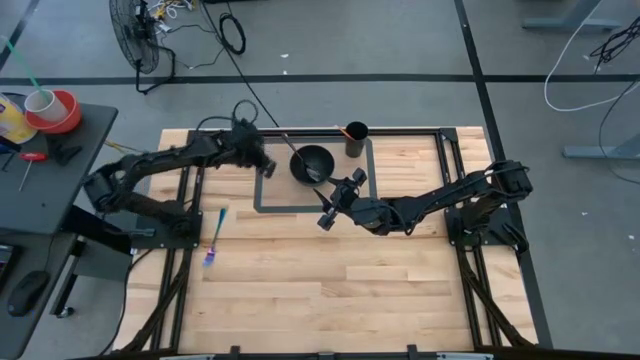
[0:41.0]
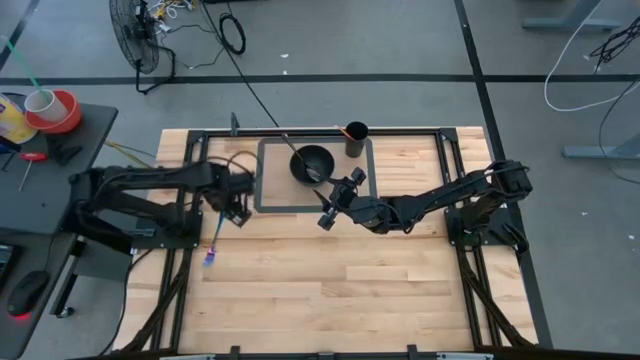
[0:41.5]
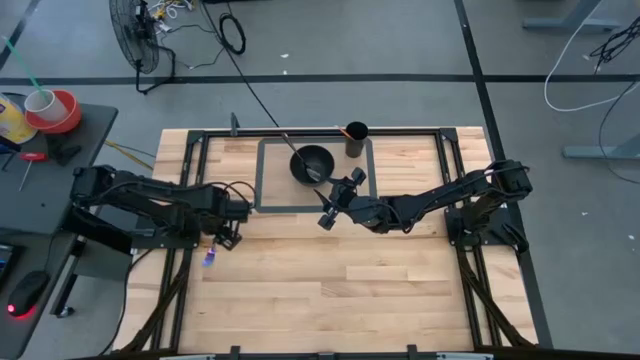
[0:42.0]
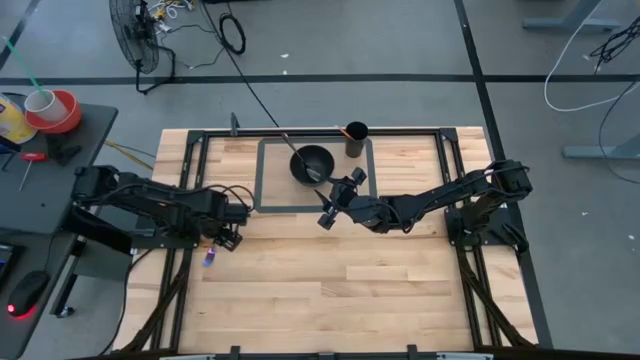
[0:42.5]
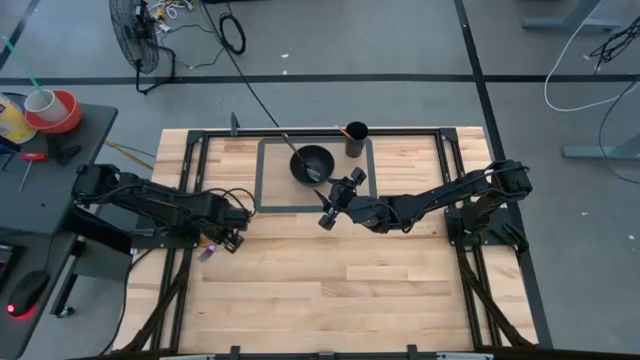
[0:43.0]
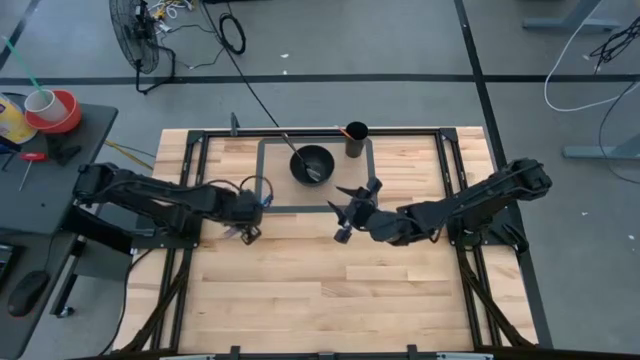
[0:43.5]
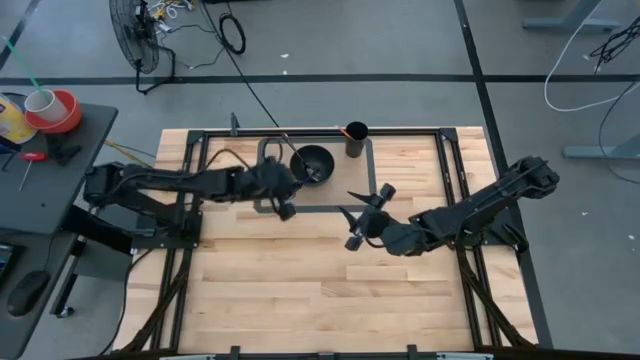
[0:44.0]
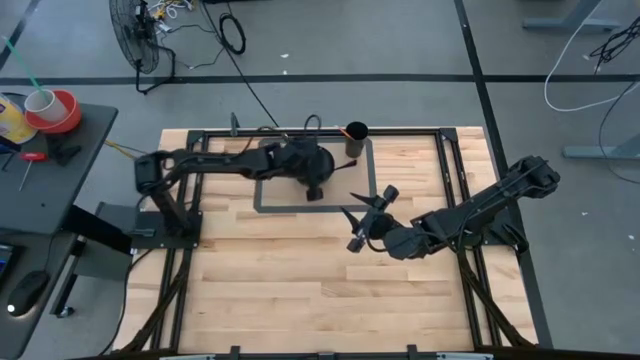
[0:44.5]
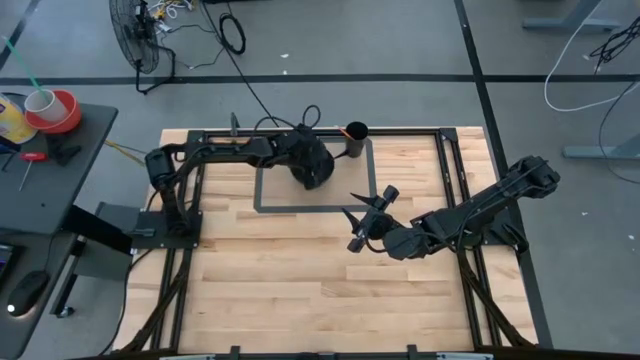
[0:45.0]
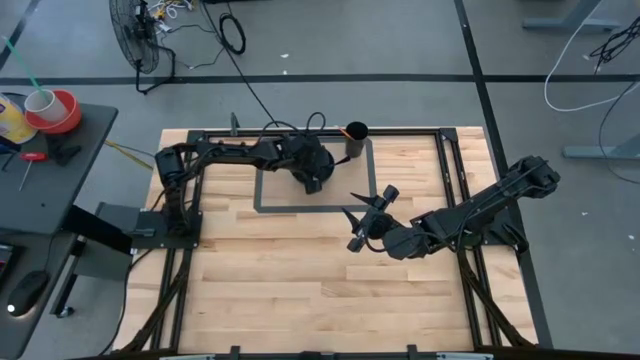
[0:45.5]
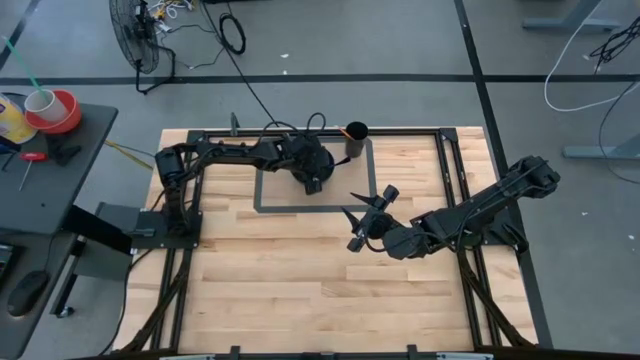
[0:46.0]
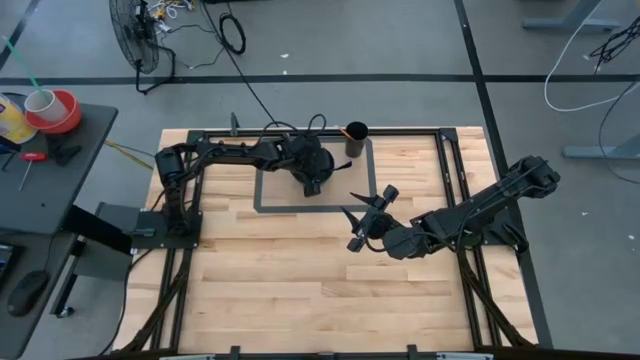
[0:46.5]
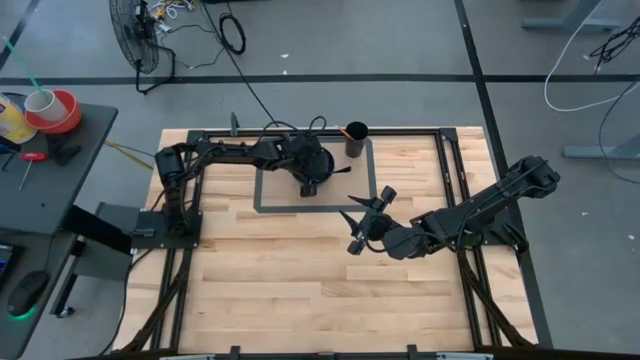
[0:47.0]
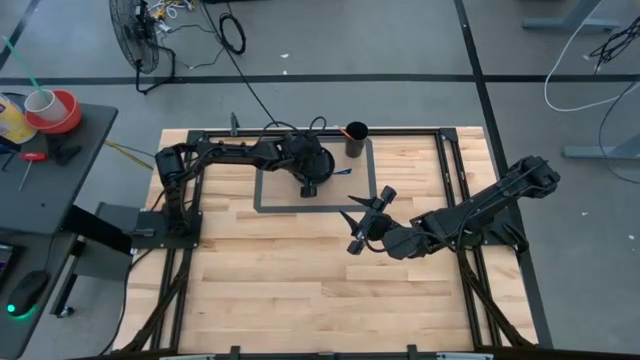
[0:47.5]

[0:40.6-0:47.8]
Task: Pick & Place Utensil
Put the blue fork into the black bowl

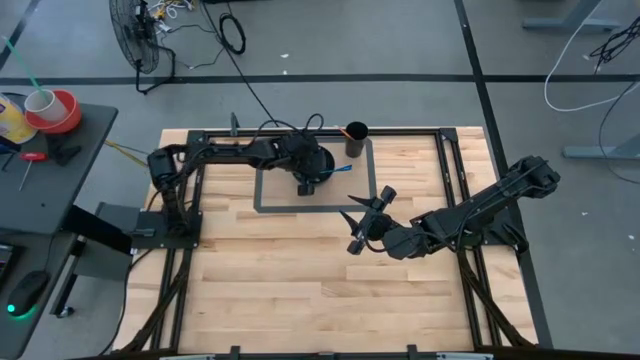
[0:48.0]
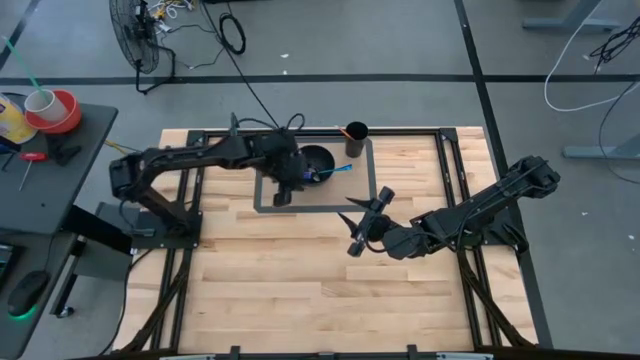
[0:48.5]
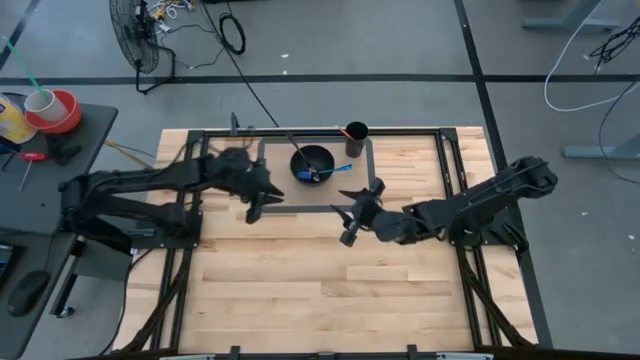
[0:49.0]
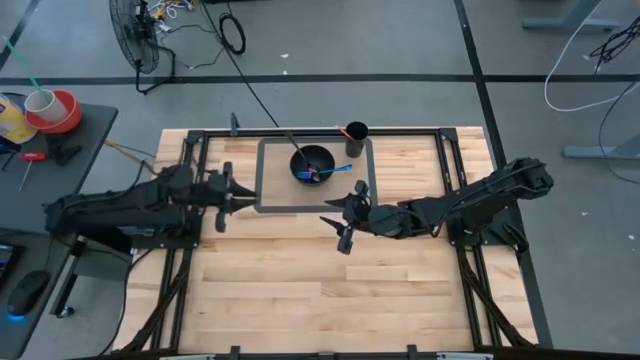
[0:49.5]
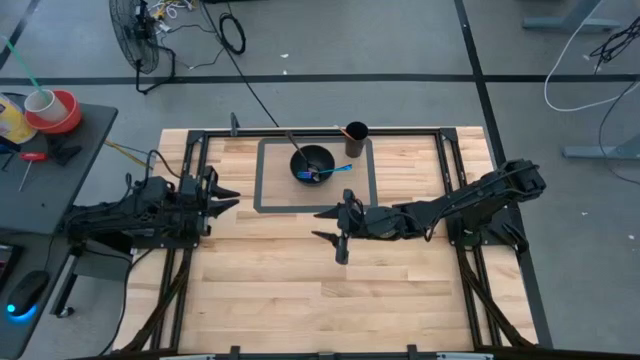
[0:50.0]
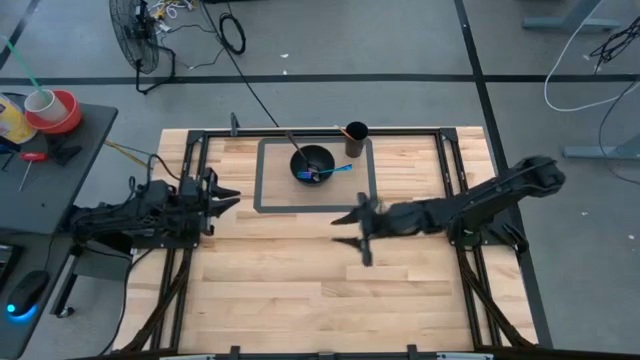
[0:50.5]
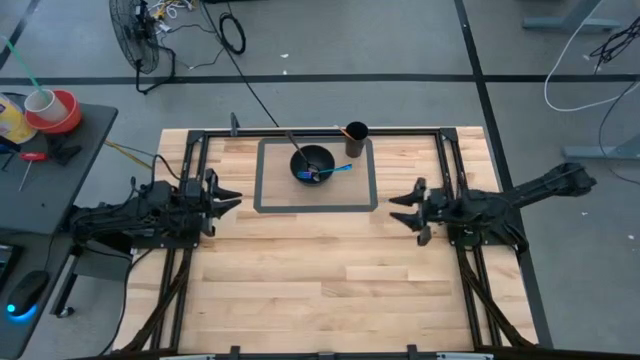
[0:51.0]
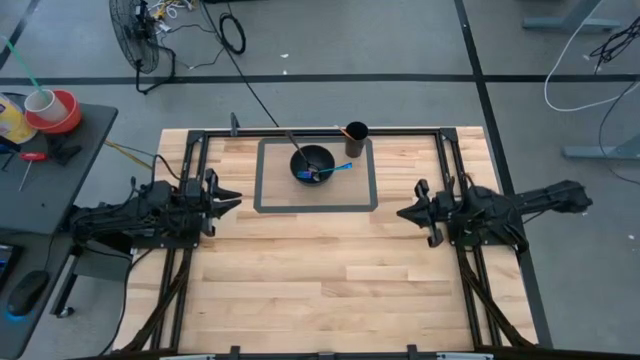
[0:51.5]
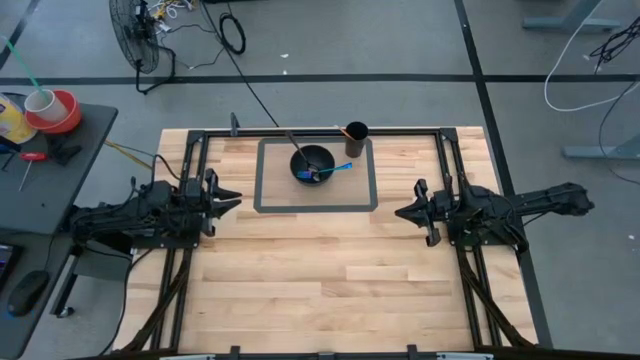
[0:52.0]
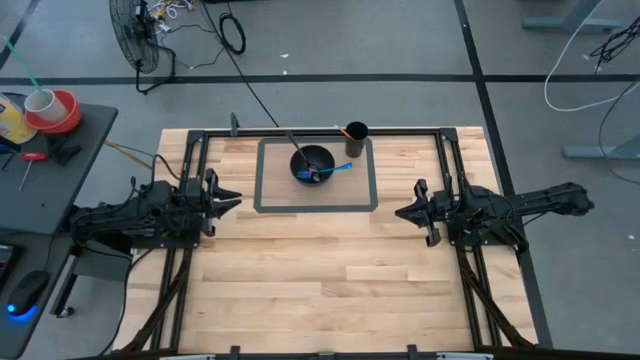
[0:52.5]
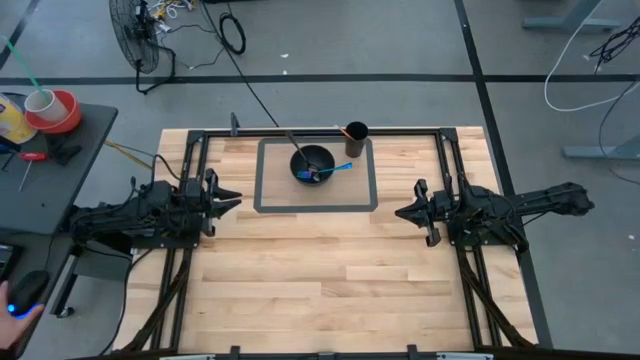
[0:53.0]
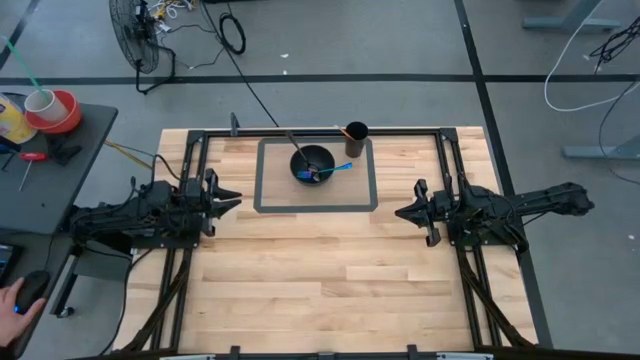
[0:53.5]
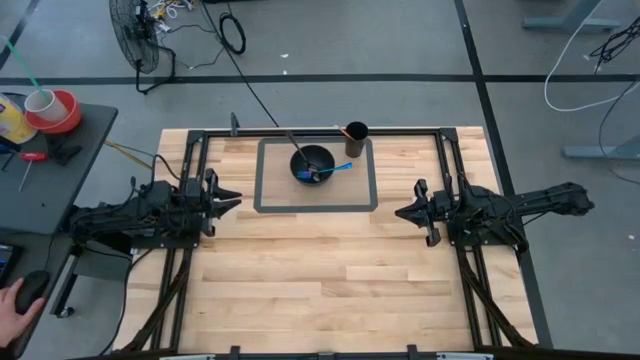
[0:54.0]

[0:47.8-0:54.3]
Return to Home Position

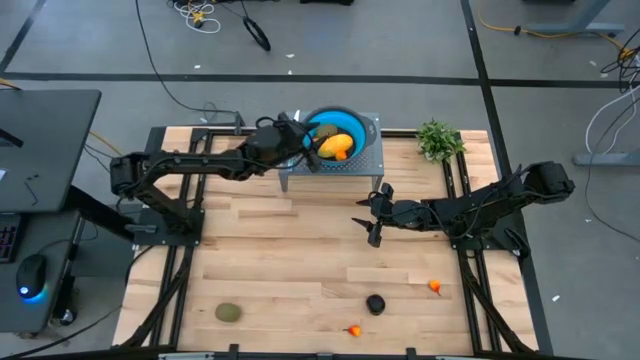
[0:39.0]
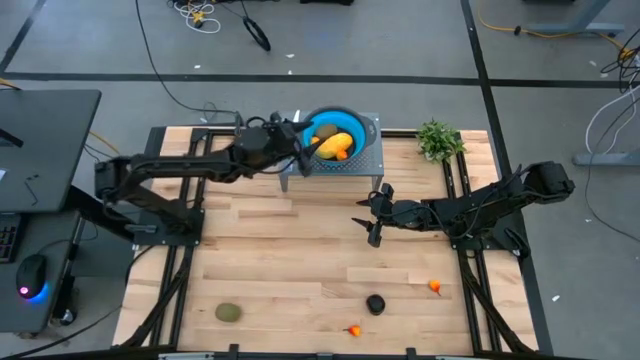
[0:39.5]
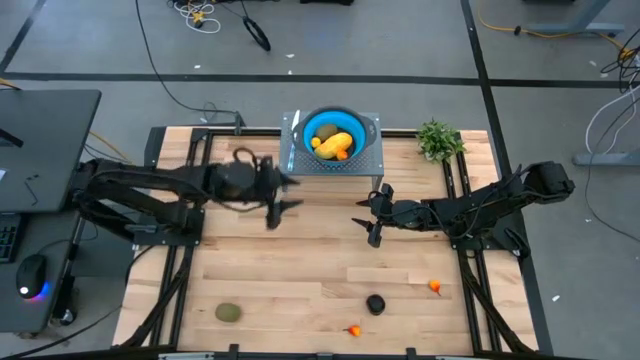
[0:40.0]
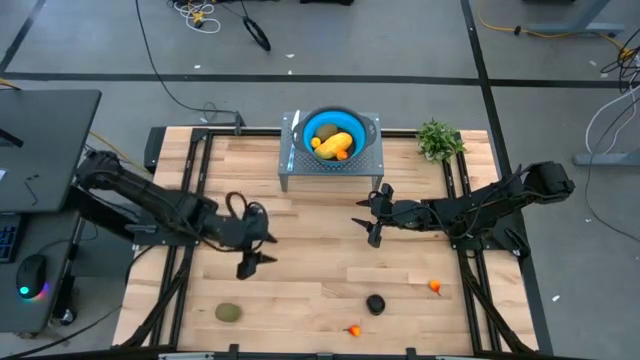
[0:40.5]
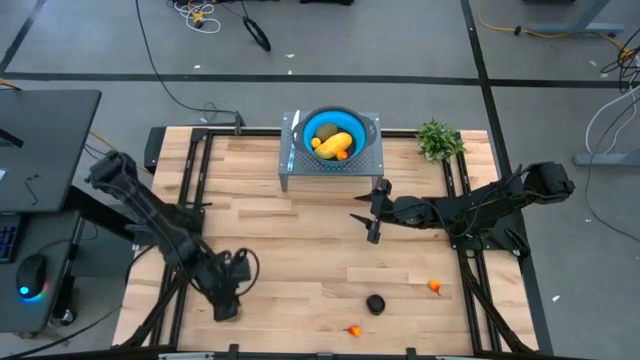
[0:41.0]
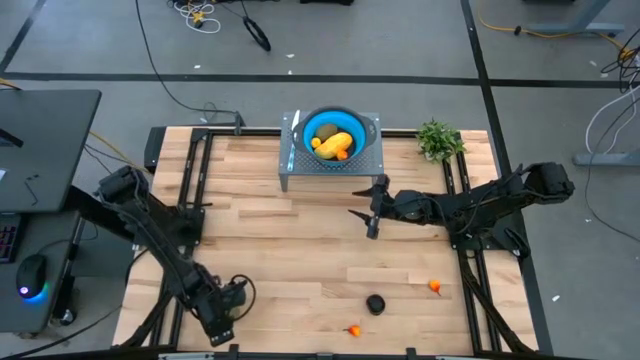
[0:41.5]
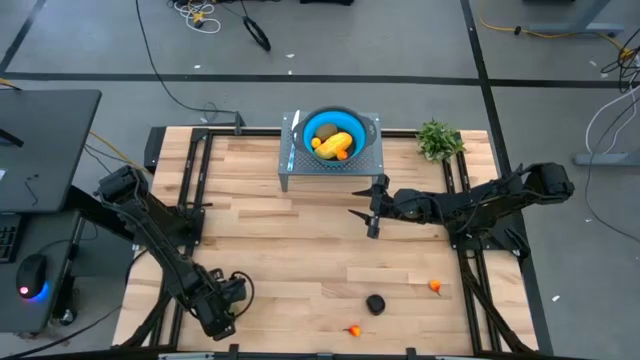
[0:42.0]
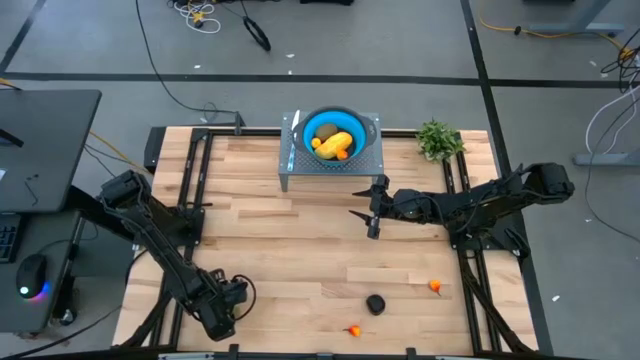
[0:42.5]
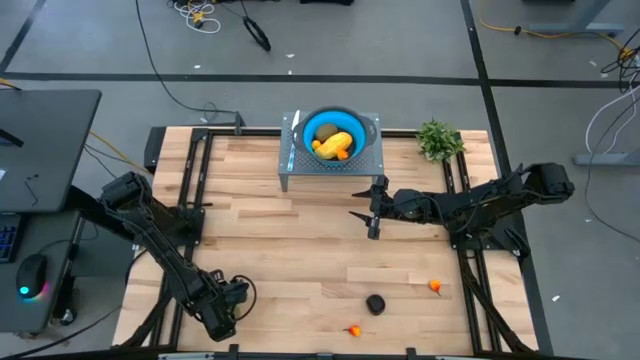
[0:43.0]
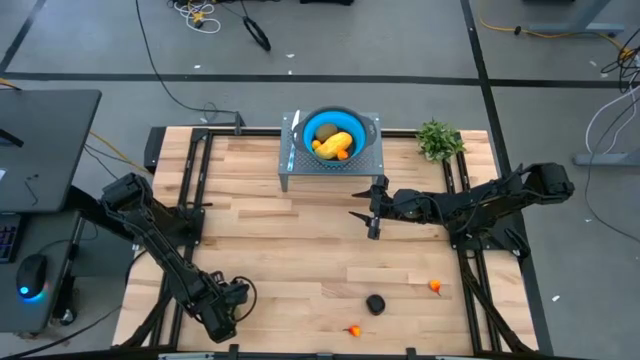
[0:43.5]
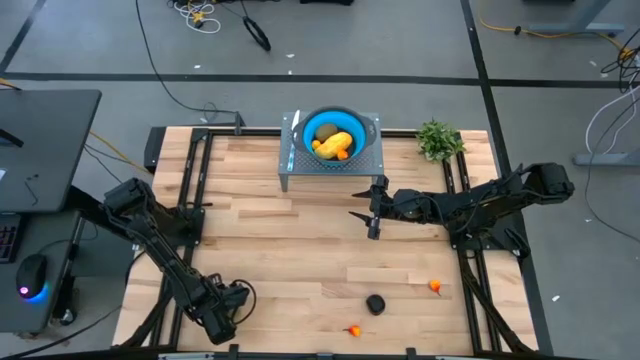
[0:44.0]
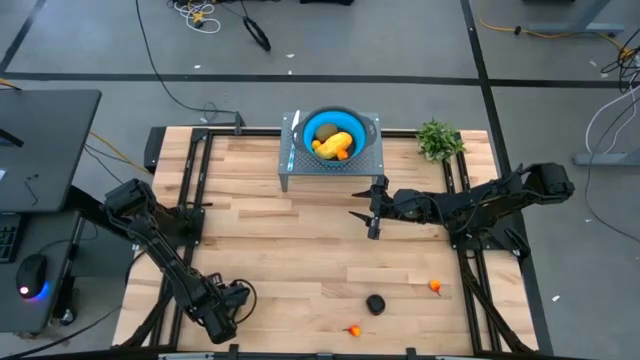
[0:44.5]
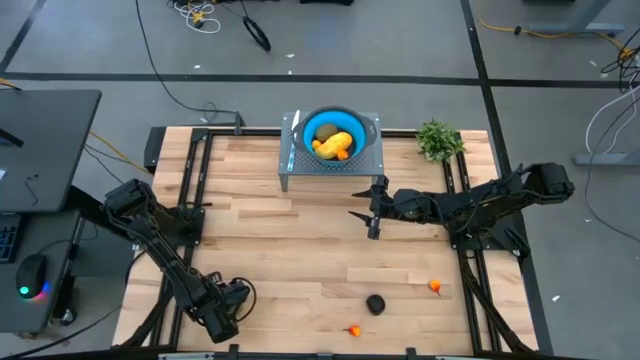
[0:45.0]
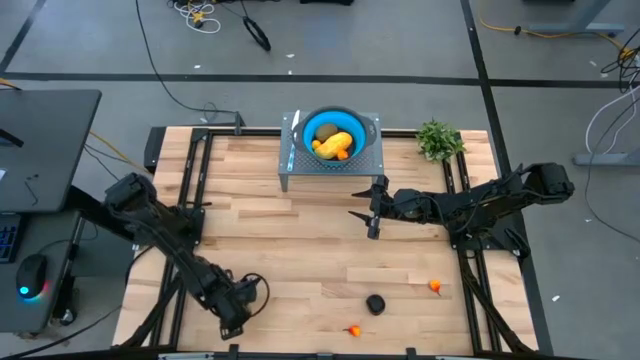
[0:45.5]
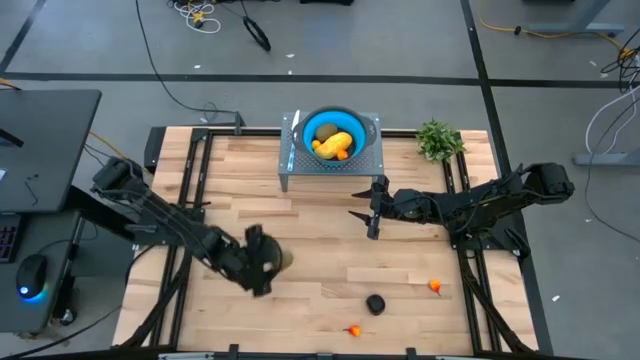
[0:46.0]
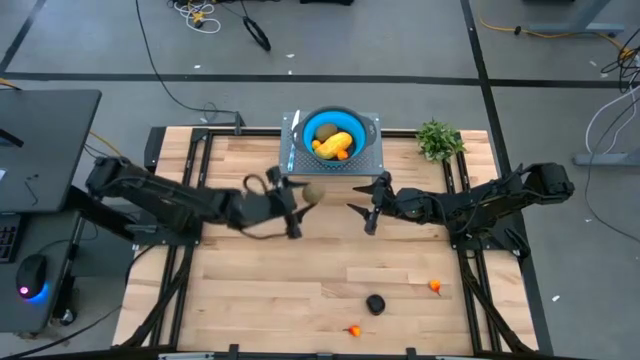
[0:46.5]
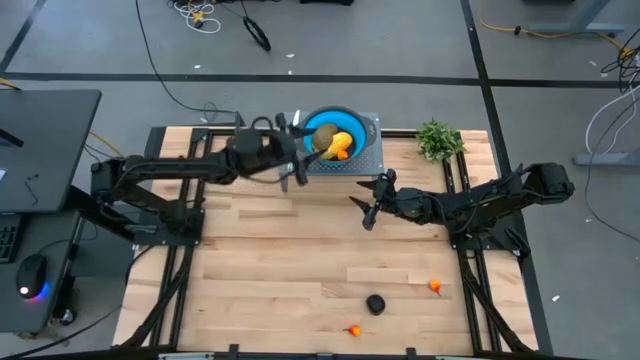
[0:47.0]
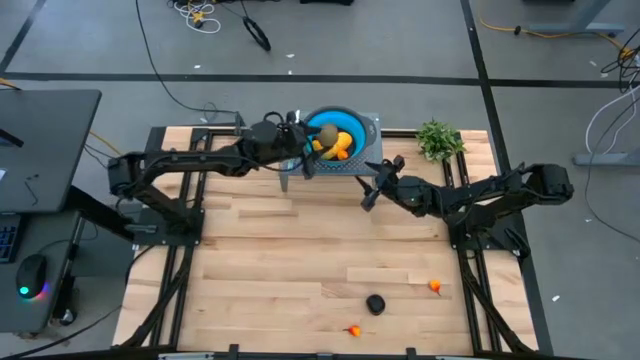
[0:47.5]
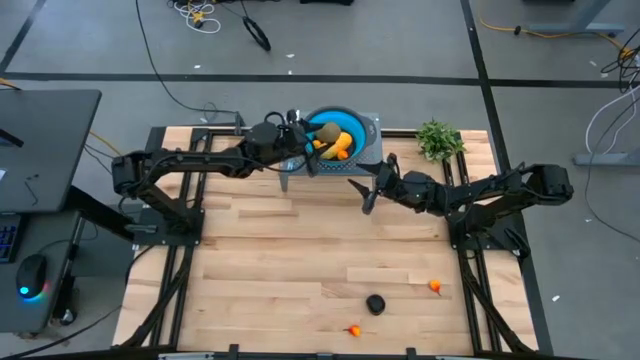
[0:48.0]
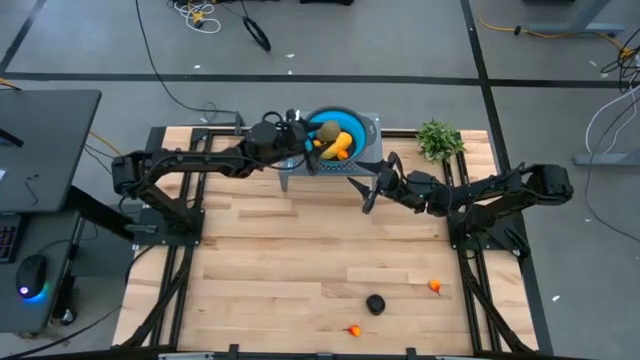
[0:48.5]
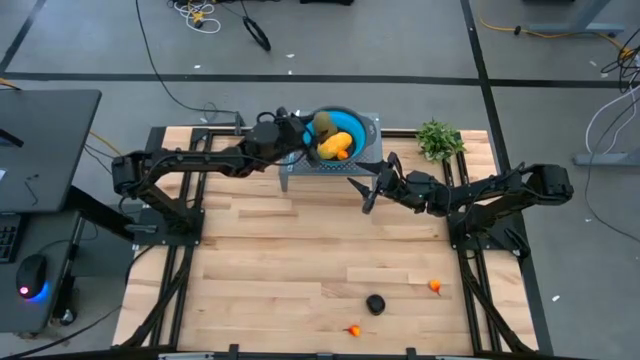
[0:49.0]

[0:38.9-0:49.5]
Task: Pick & Place Fruit
Put the brown kiwi into the blue strainer bowl
